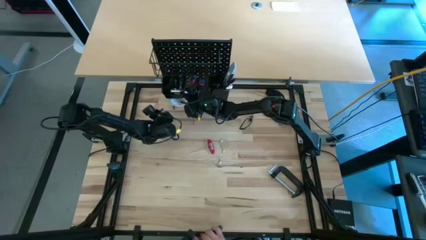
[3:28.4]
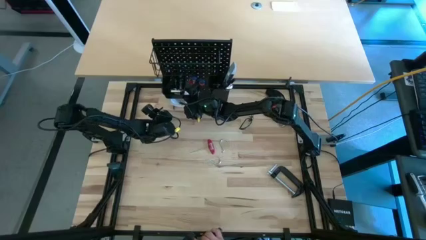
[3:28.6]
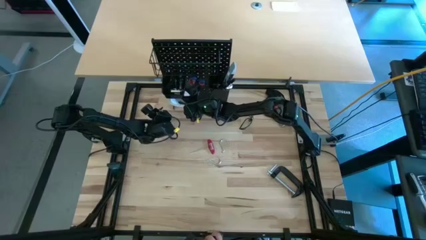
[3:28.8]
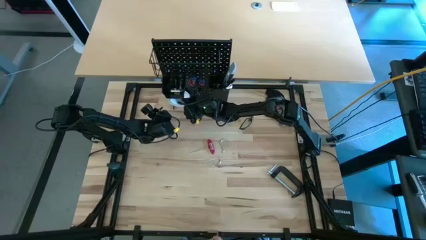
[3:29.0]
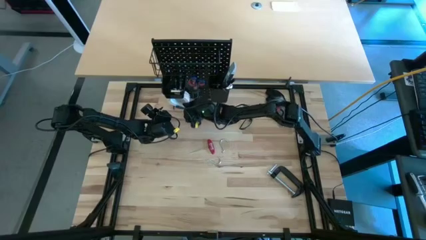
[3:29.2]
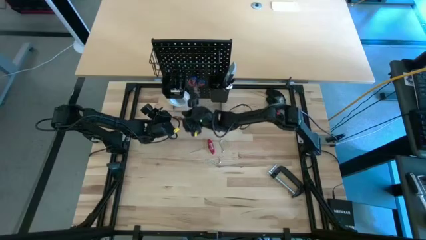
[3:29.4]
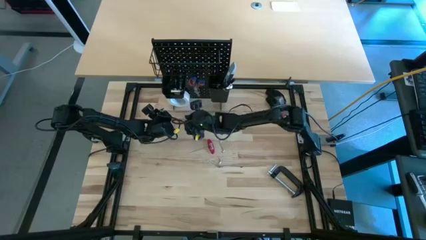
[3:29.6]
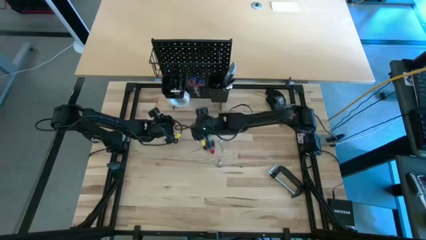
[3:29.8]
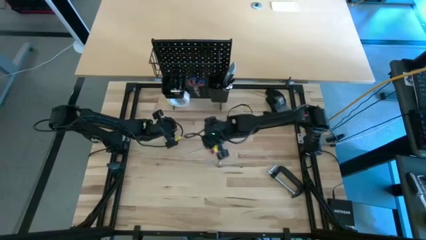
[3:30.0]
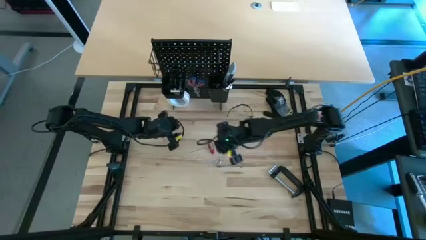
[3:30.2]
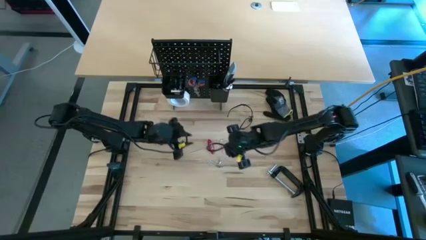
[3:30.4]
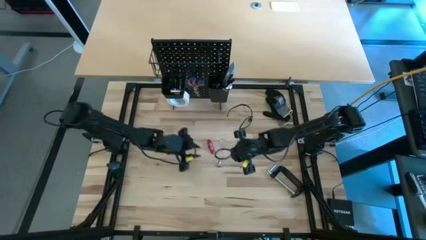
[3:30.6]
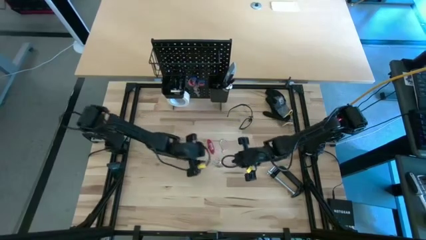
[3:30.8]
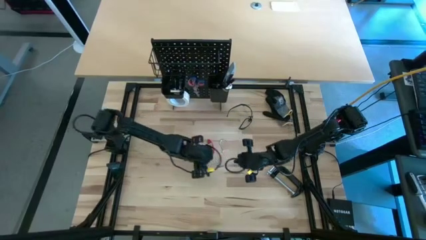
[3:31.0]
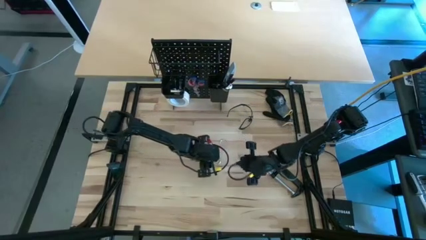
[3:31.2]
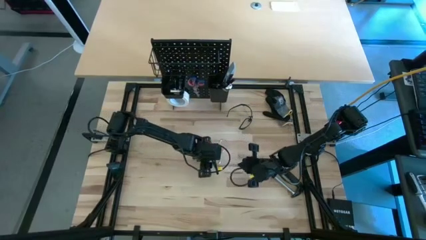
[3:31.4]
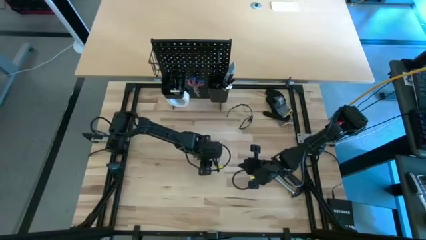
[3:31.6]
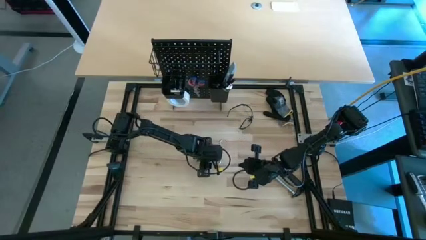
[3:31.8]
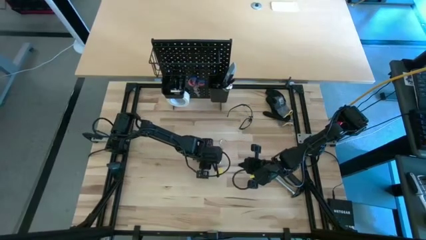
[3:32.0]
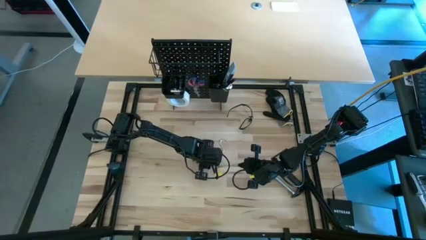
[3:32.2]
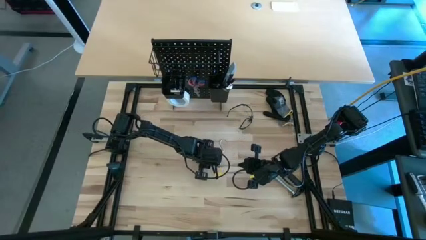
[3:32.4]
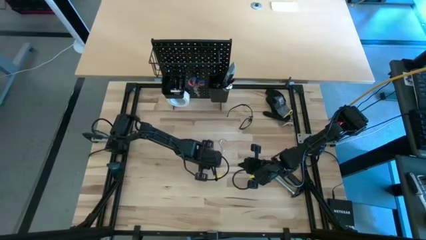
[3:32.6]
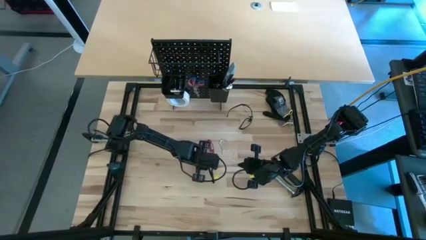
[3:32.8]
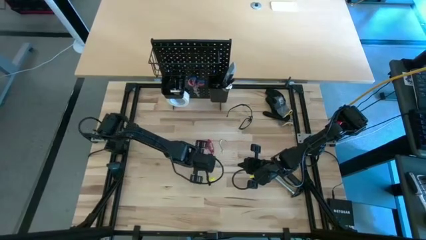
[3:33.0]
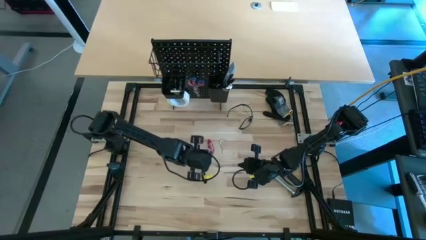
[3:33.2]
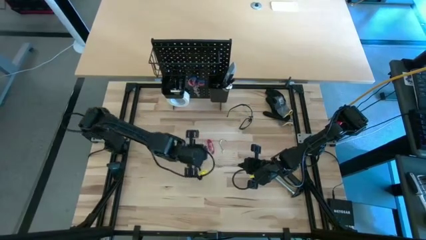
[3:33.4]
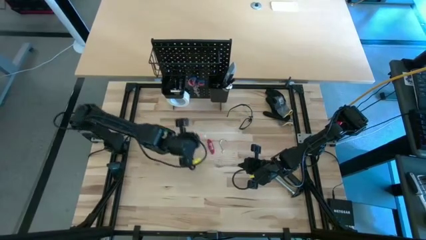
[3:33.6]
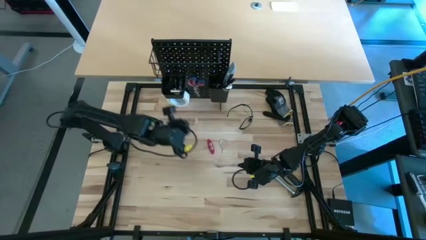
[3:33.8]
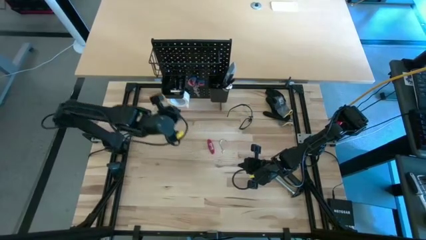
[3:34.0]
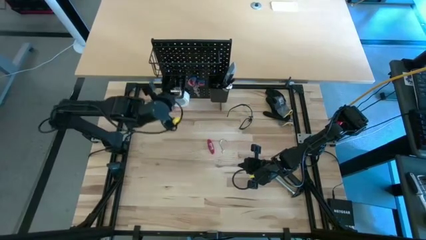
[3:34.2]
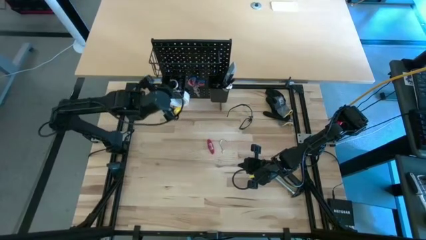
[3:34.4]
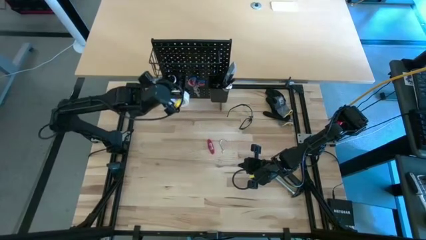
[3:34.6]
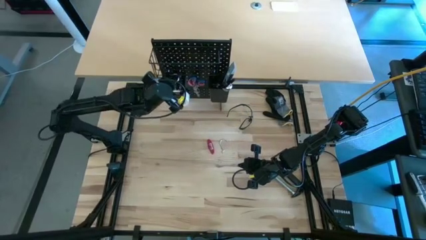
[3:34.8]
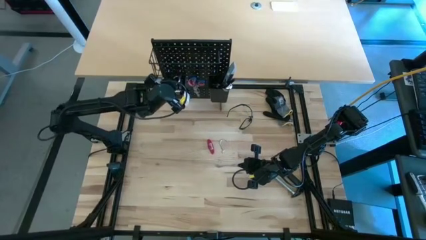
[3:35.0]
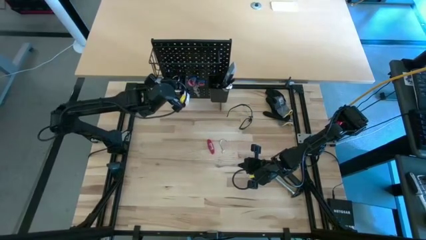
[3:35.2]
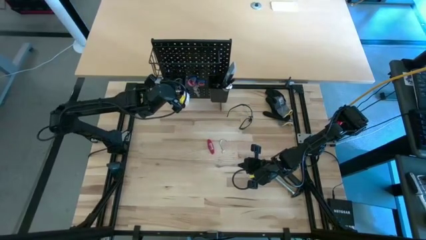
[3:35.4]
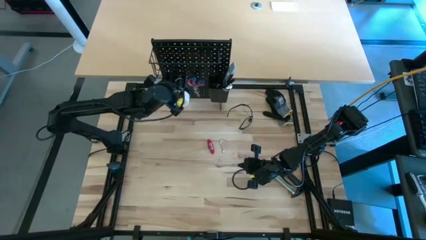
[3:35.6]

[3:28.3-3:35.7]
Task: Hang tools onto peg board
Put the silver hanger hook into the left black bin on the peg board

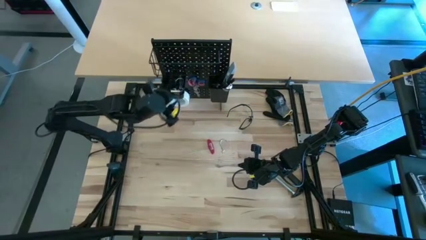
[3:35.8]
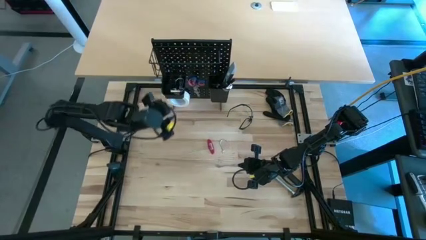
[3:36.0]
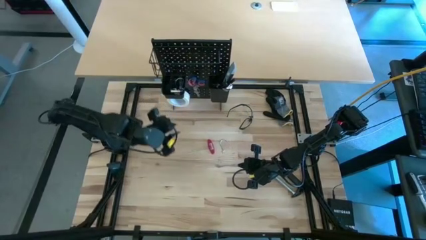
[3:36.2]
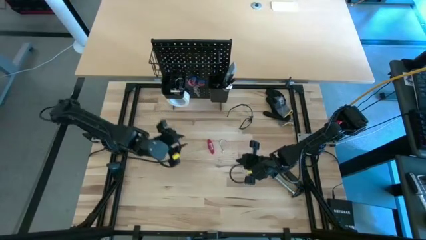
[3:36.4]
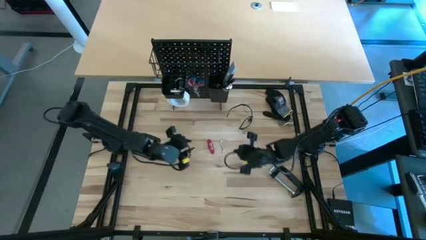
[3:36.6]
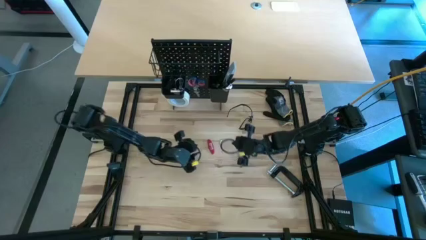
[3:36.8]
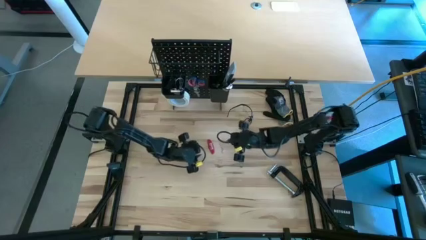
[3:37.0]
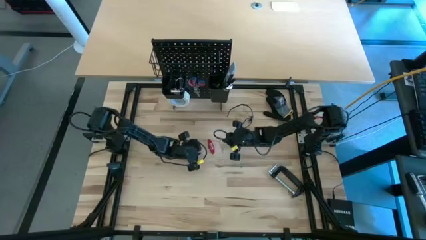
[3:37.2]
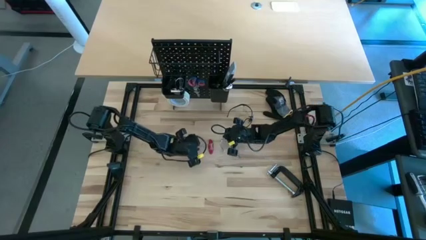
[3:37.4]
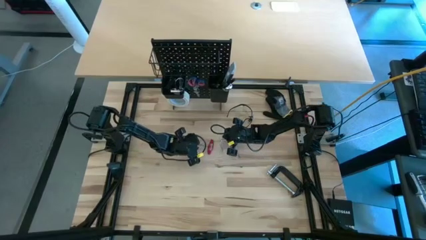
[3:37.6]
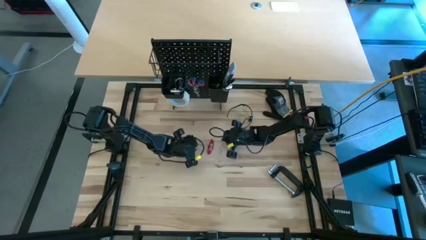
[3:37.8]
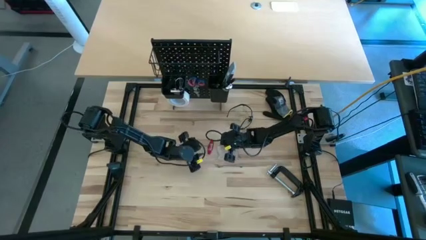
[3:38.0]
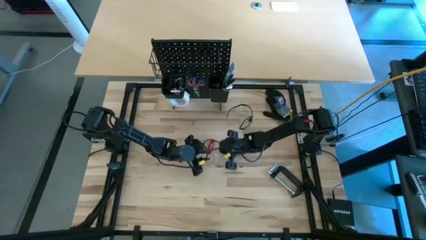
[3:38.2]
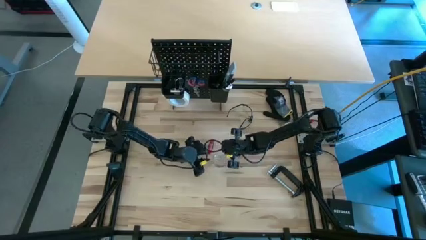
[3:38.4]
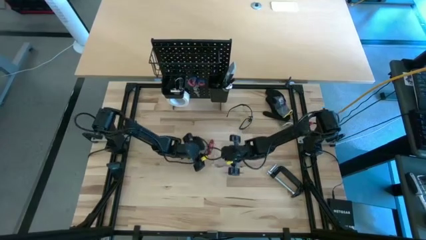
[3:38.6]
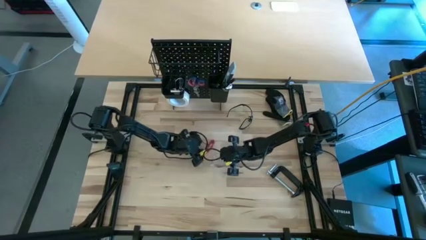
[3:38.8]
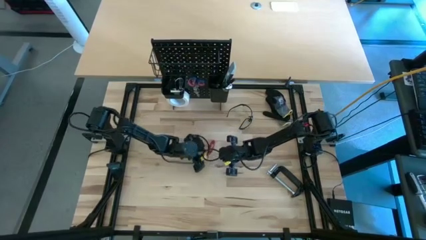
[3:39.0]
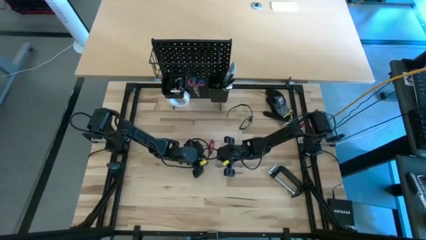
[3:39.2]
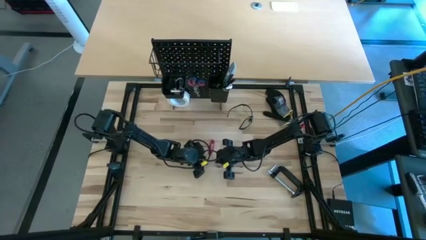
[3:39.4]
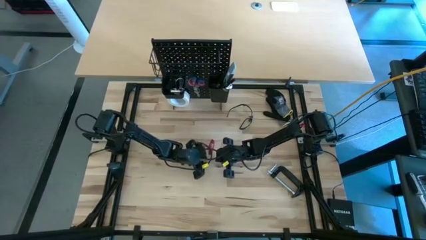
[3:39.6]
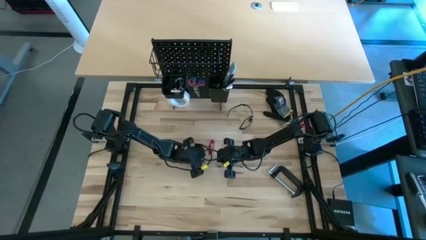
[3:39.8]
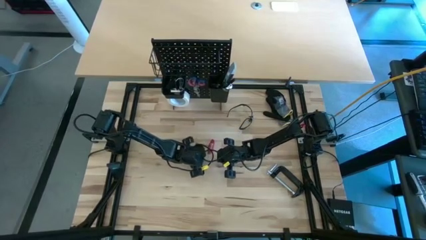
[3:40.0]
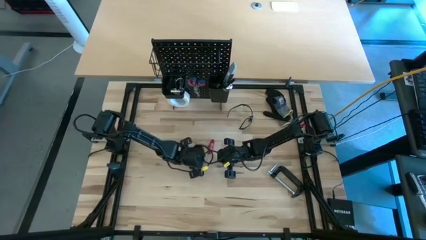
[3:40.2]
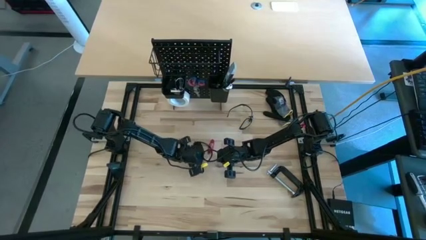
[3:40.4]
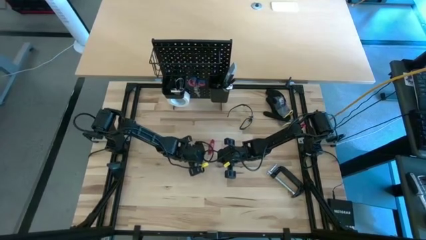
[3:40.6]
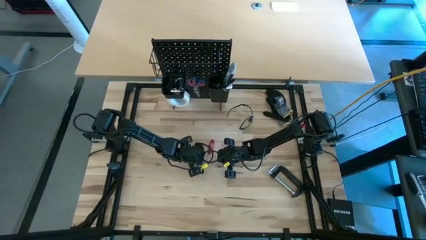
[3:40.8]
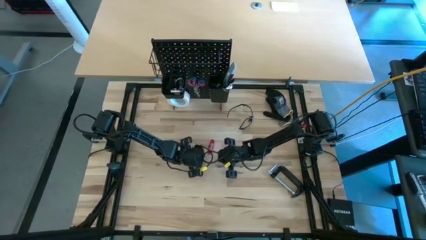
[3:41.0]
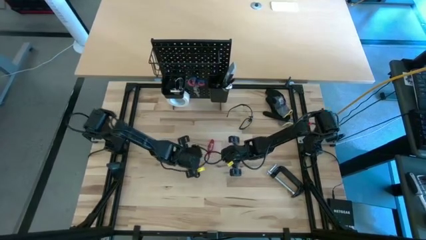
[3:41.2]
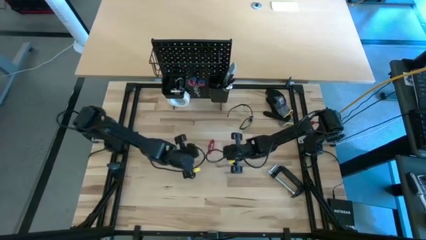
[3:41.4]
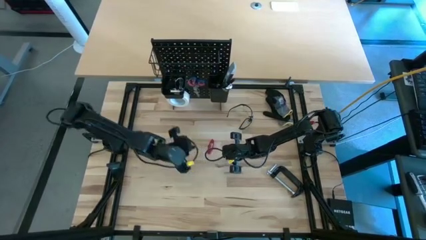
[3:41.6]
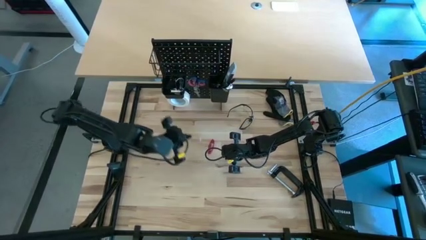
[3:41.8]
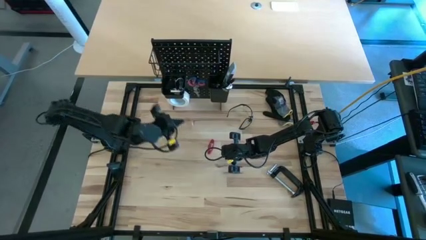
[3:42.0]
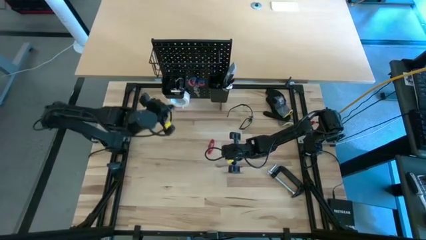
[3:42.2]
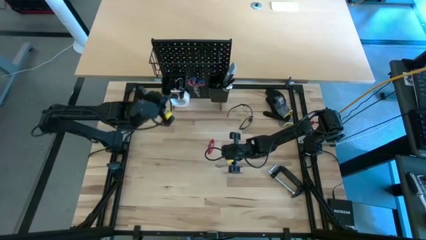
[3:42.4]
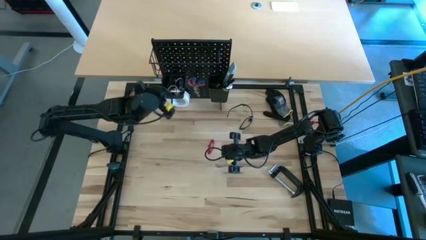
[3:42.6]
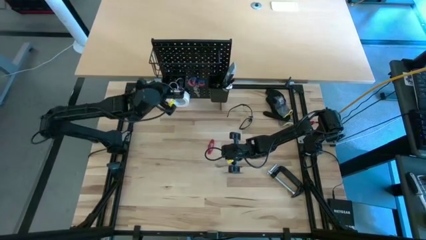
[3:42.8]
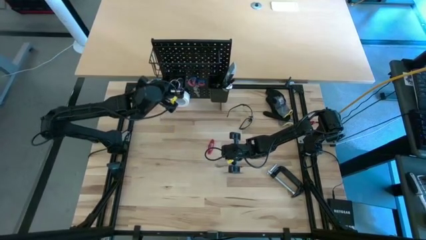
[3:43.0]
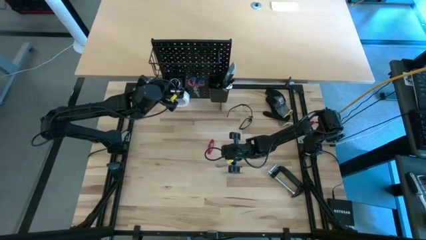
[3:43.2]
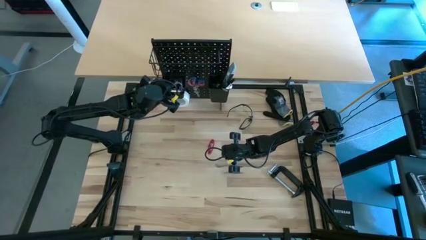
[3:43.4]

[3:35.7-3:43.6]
Put the silver hanger hook into the left black bin on the peg board

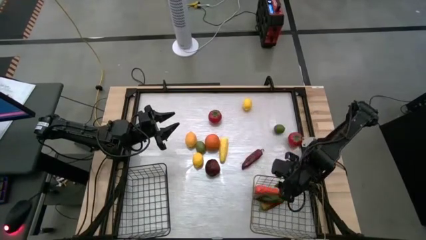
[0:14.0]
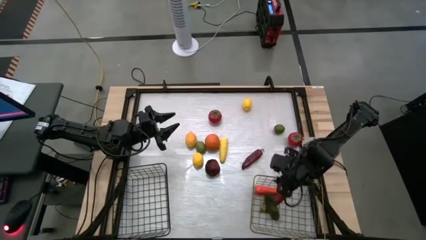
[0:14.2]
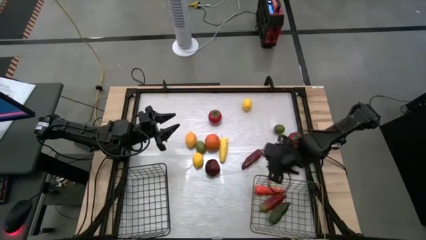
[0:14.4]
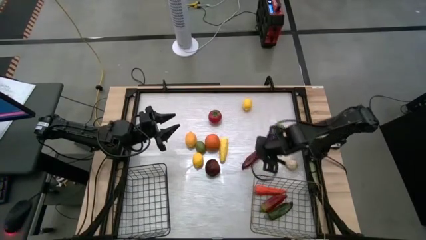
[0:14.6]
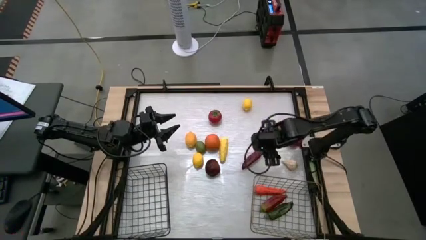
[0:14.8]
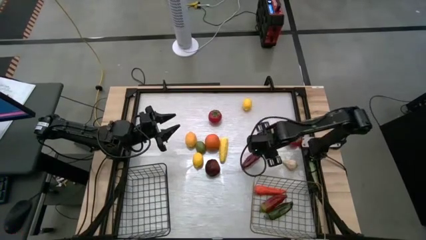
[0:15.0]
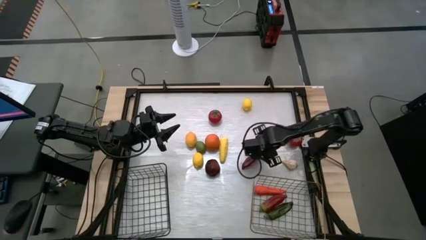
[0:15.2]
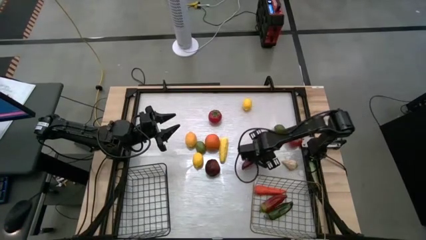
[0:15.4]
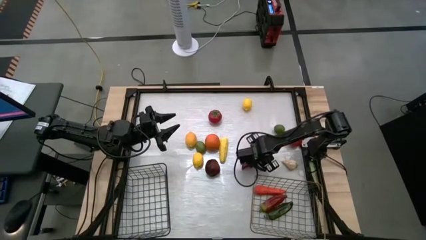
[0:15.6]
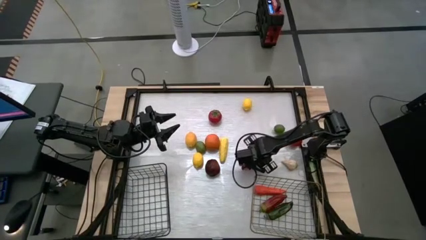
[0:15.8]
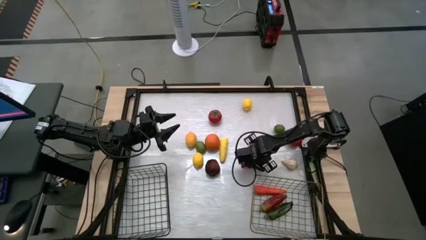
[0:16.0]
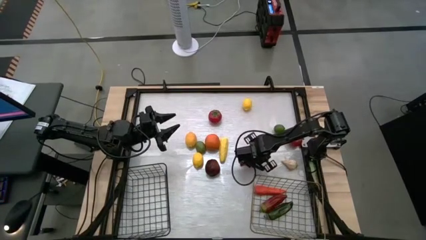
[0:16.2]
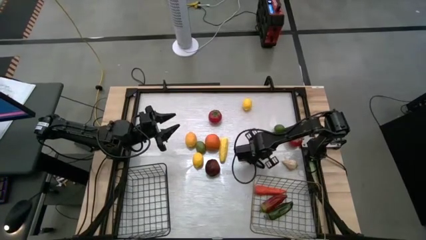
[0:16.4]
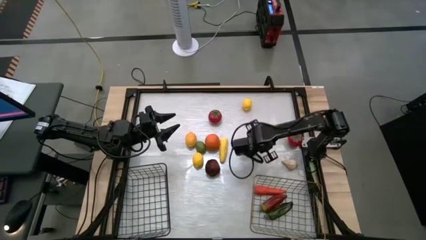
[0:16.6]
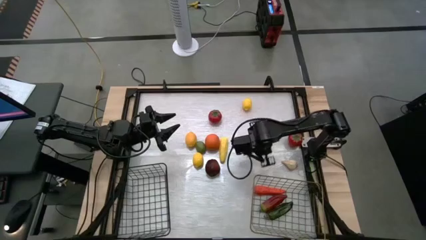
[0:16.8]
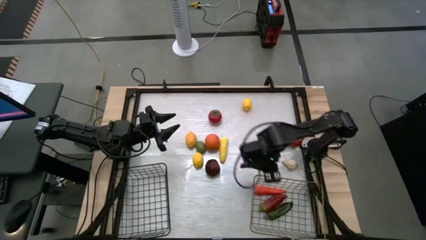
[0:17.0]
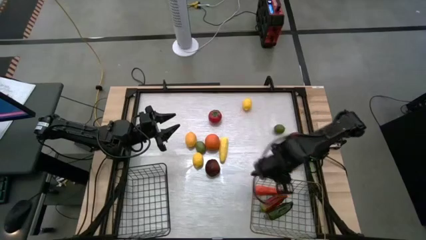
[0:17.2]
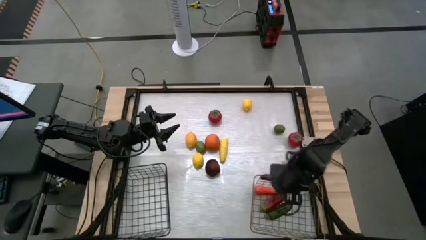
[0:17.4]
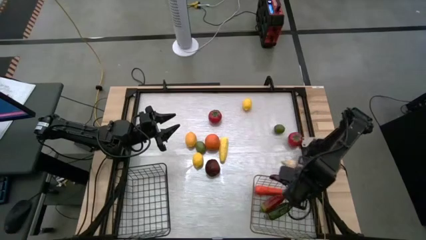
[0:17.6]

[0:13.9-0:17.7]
Task: Sort produce into baskets
Put the red bell pepper into the gold wire basket
